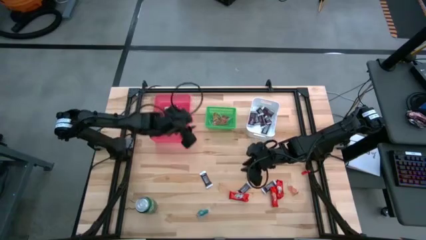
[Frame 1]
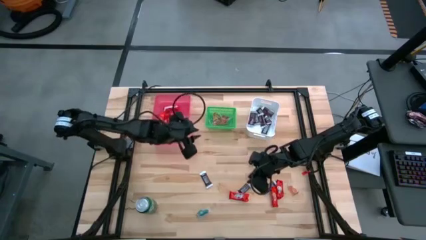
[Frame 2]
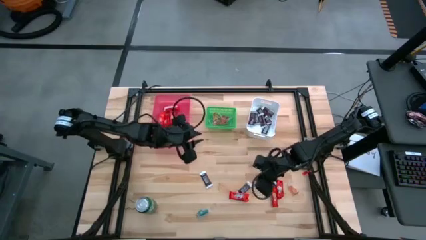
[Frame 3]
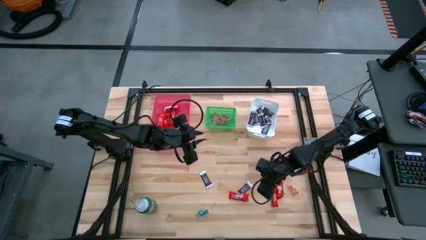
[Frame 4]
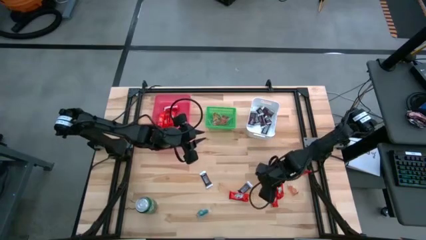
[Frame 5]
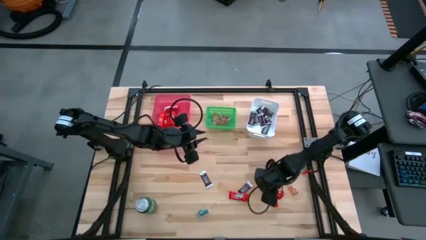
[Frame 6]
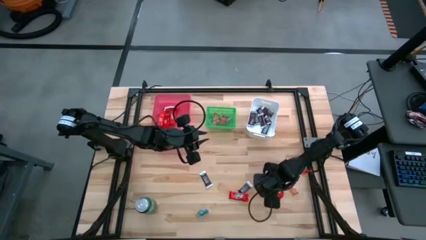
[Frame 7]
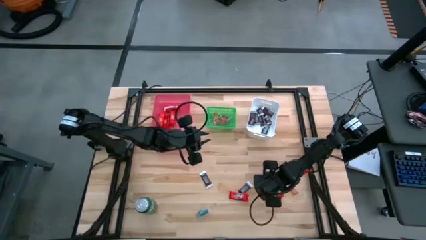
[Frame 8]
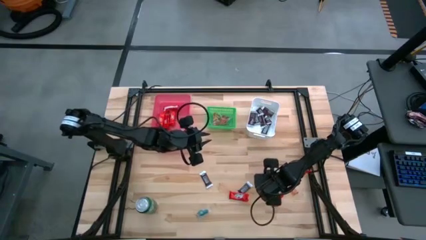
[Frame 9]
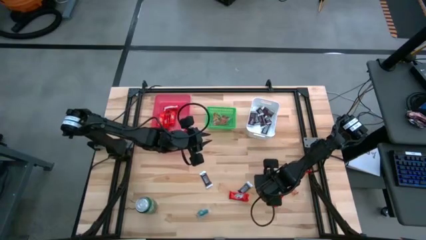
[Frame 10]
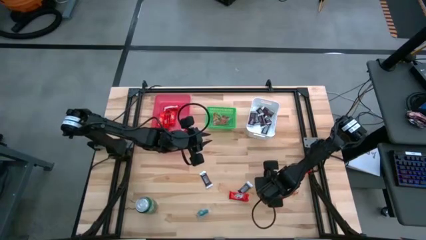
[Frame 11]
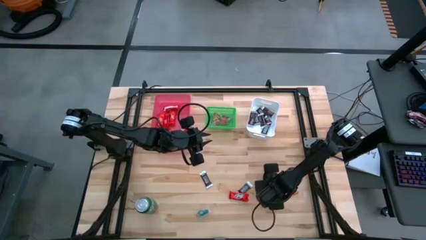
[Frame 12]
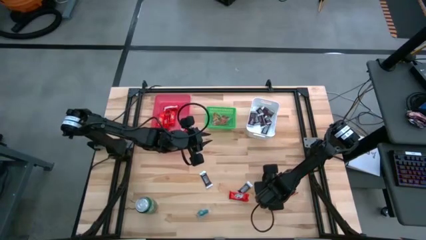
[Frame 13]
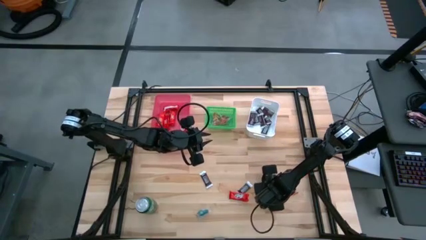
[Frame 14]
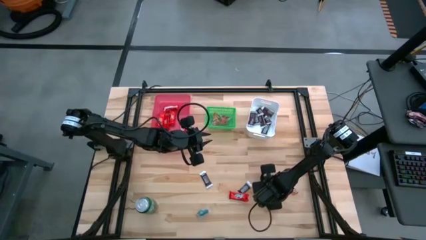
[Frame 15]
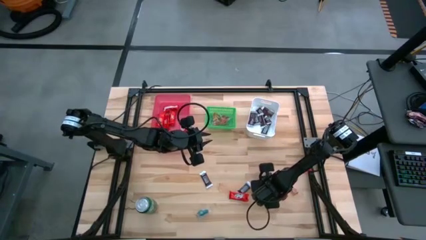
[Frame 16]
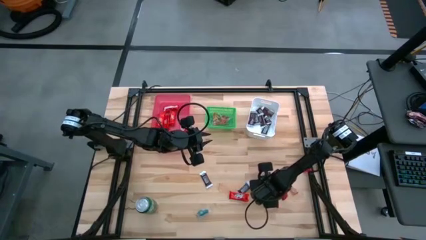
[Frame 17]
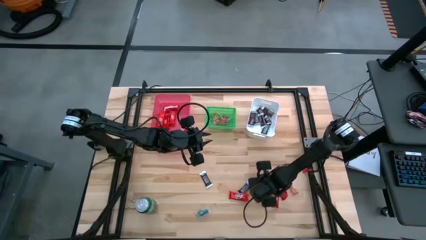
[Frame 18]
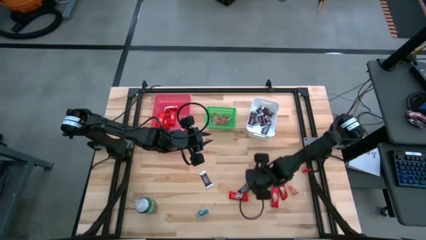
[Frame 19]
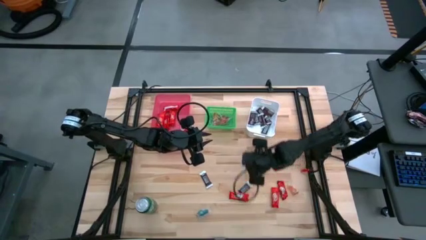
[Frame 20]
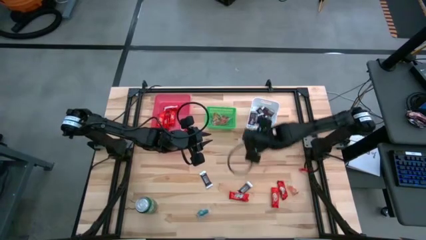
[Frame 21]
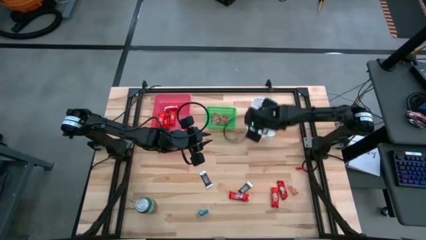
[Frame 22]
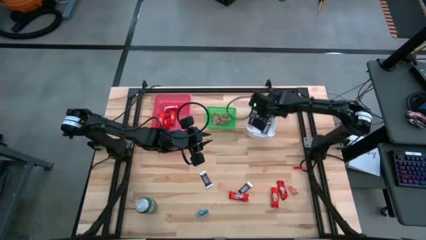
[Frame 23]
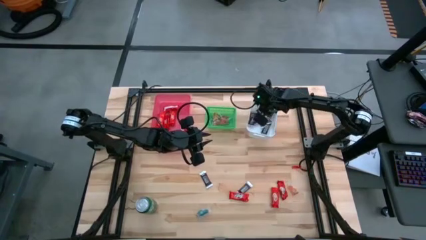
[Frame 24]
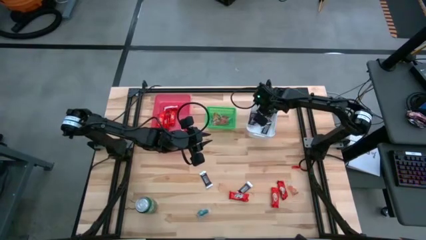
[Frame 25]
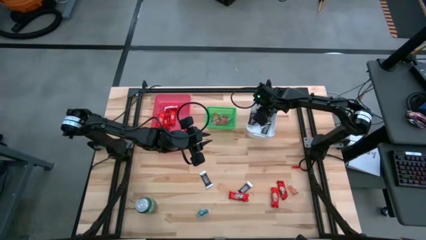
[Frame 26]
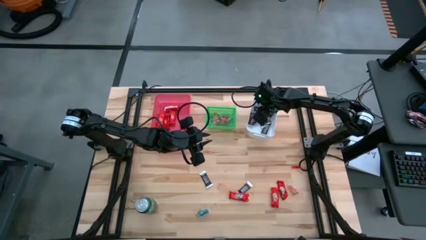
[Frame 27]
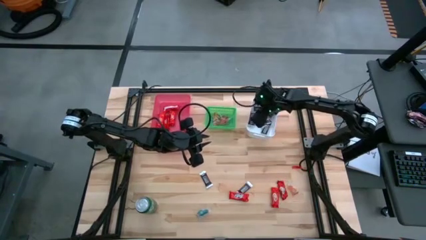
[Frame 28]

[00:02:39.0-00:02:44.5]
Task: Sort candy
Put the brown chocolate bar into the white bin

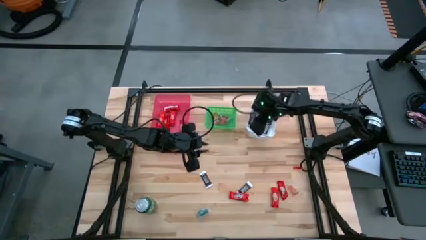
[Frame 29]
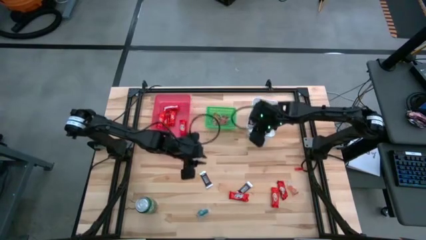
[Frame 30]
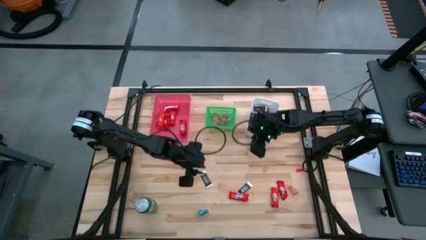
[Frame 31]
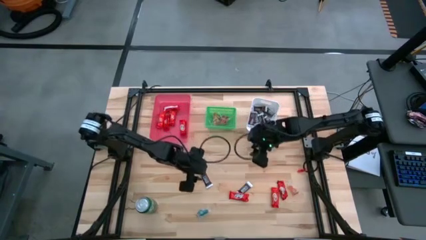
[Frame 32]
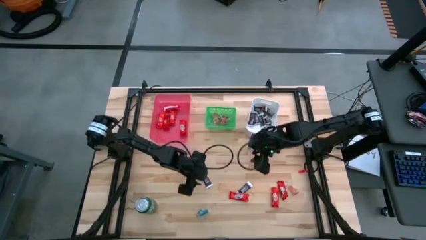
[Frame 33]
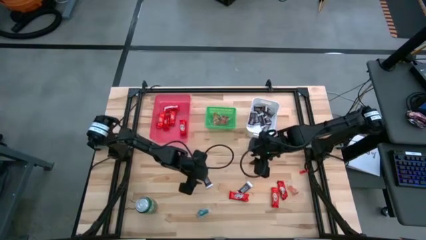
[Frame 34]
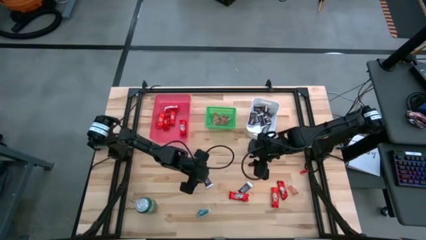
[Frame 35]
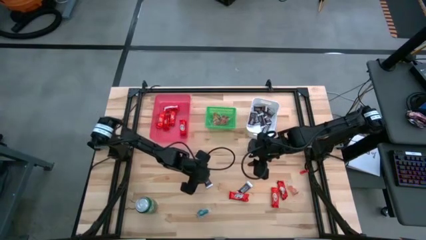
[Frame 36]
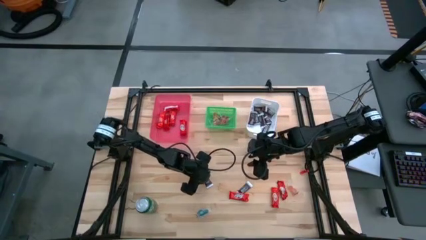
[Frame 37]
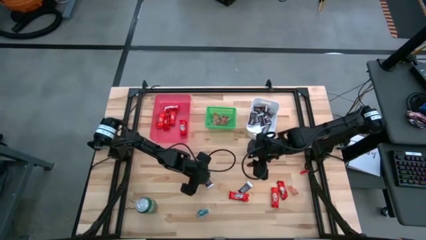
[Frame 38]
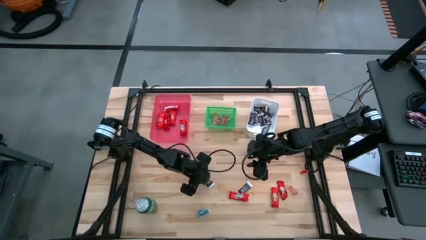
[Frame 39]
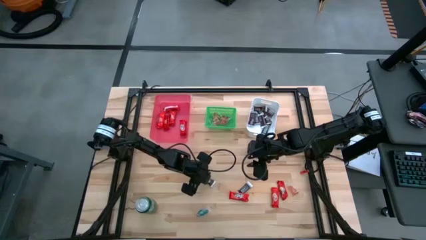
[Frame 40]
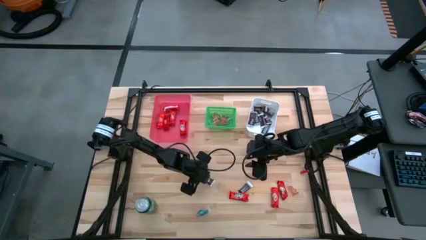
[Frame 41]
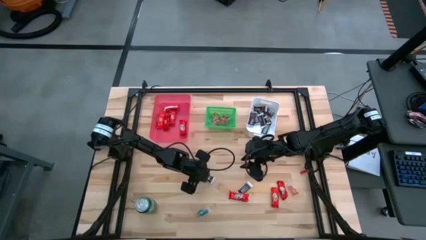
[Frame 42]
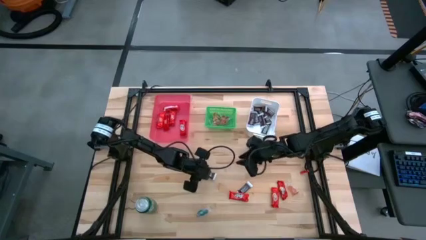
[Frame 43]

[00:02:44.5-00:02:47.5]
Put the brown chocolate bar into the white bin

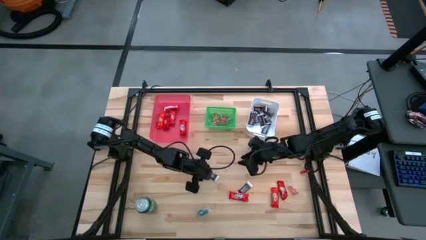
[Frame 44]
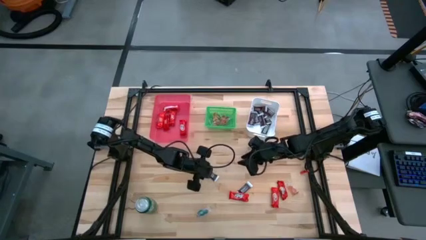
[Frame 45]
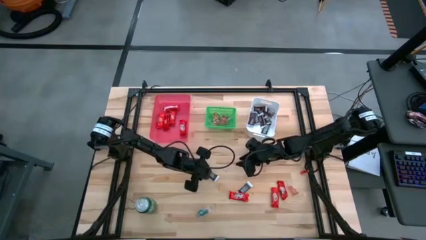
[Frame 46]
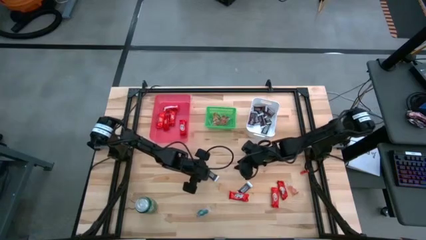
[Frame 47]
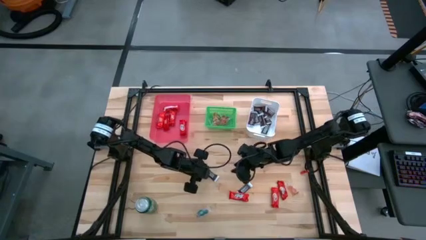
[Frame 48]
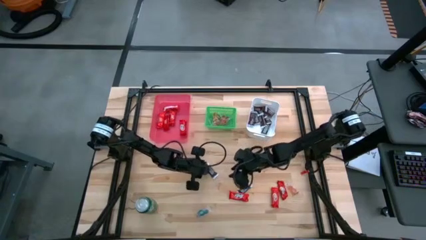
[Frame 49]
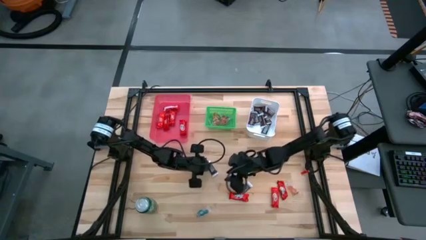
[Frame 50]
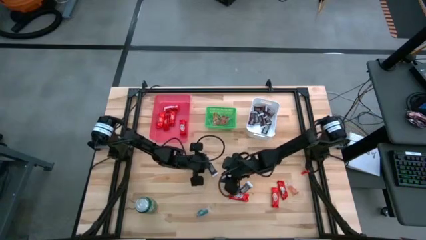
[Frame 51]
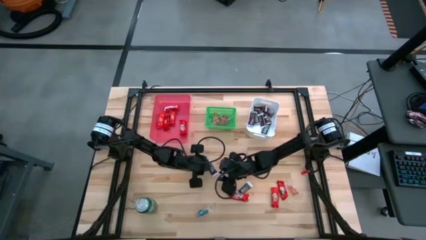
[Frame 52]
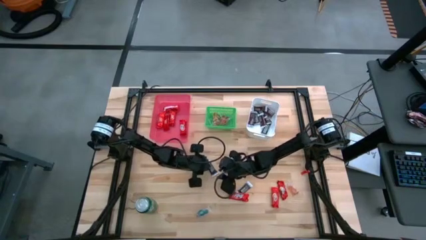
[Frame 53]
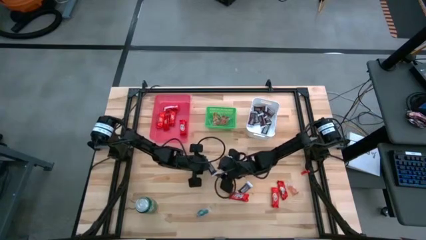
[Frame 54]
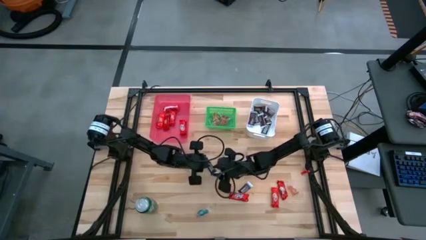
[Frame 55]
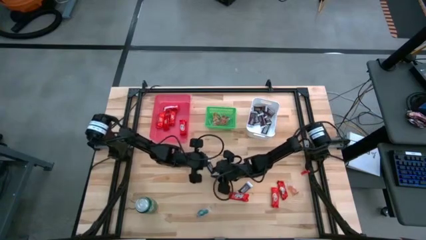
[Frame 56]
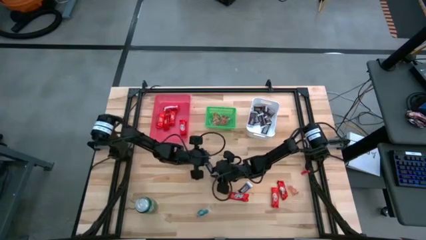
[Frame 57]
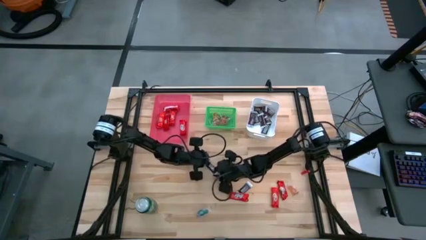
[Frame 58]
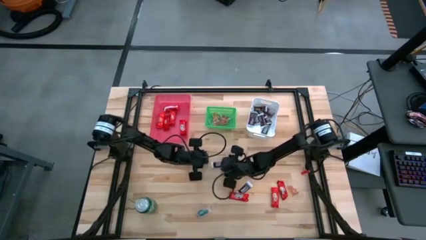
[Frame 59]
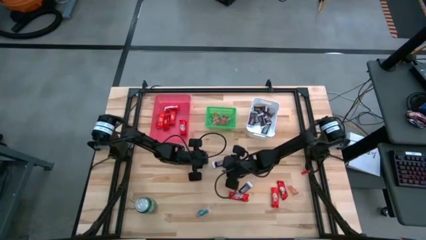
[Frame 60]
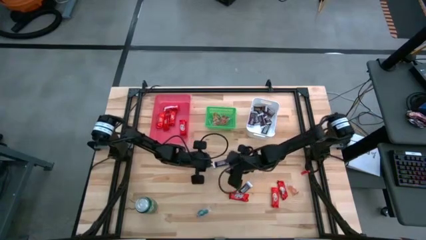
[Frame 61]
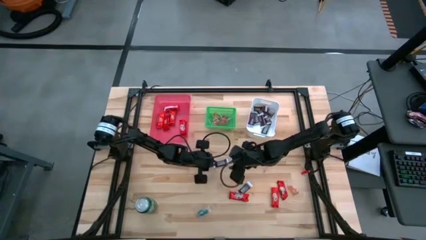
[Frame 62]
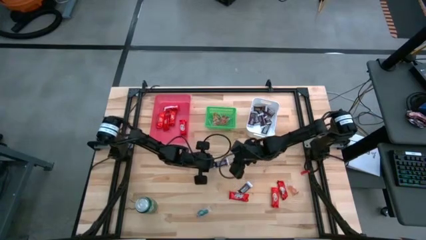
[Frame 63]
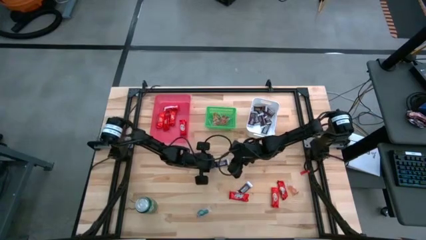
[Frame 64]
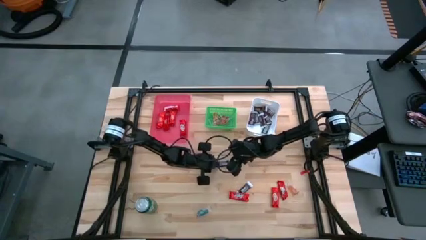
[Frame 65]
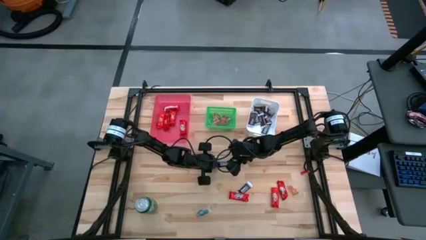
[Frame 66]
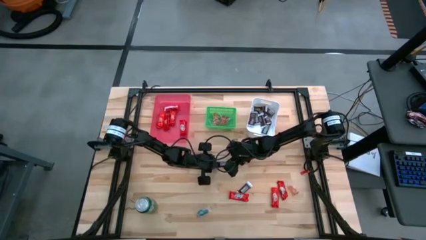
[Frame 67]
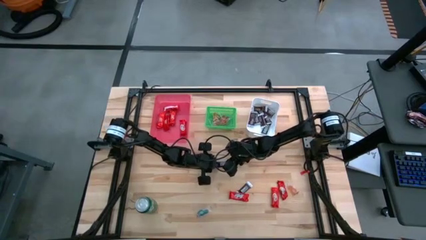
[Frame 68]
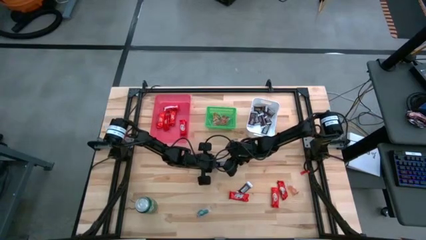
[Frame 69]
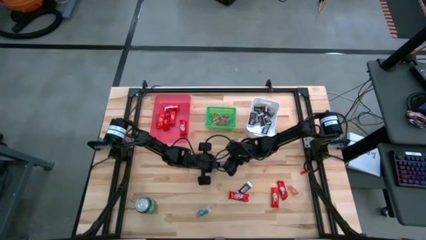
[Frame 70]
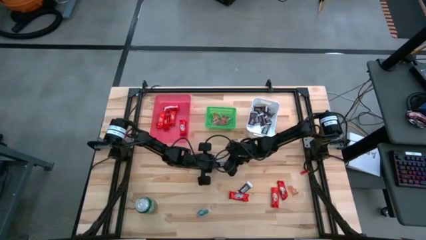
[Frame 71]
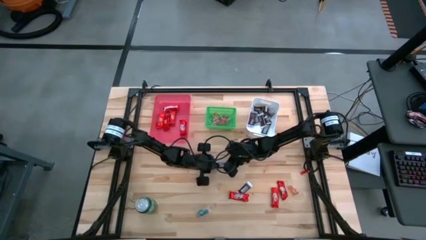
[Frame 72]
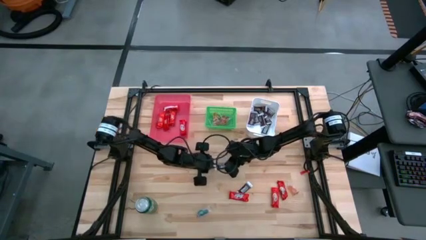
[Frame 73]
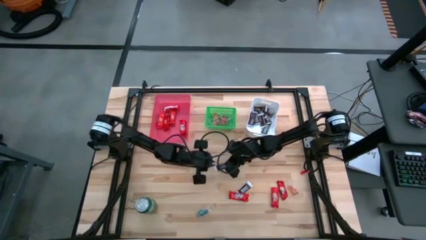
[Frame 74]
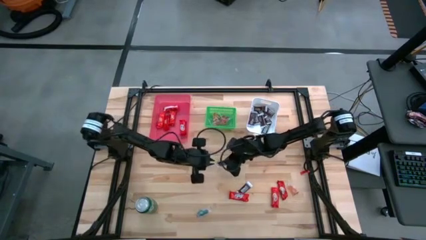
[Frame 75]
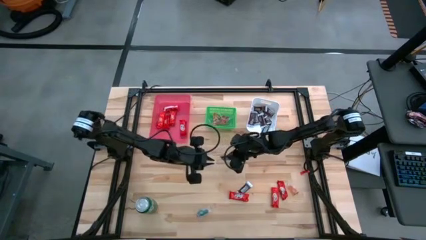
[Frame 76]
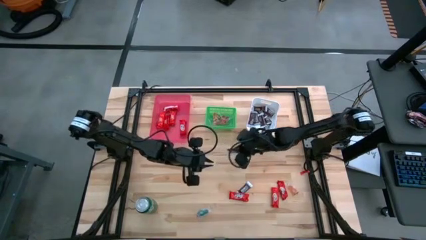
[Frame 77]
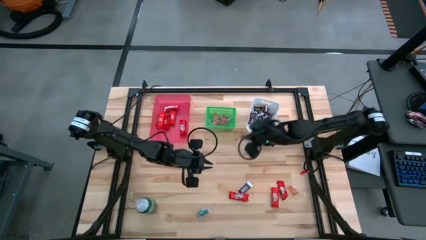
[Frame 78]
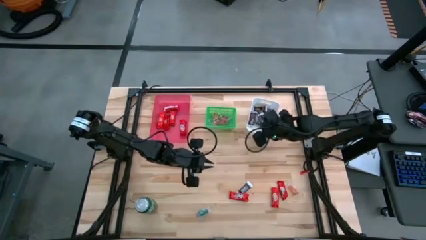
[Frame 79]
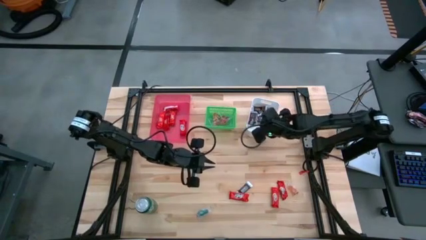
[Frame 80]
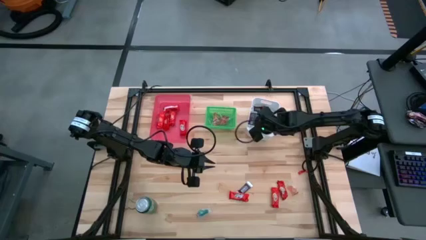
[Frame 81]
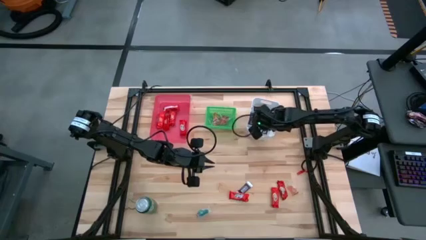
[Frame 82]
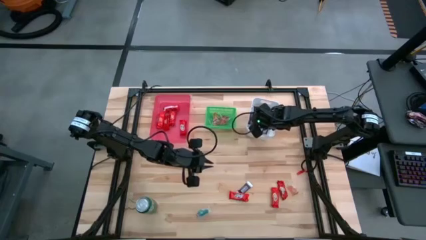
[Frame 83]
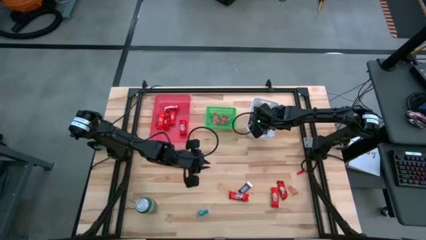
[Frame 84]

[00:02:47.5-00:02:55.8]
Put the brown chocolate bar into the white bin

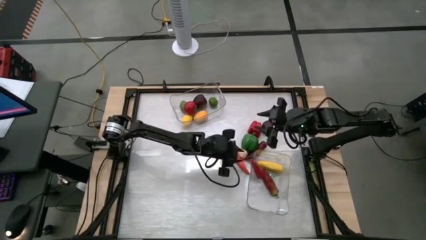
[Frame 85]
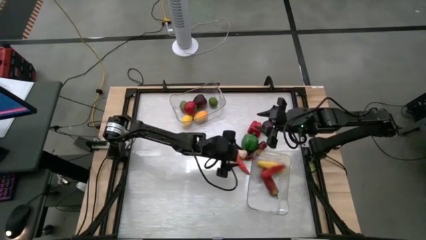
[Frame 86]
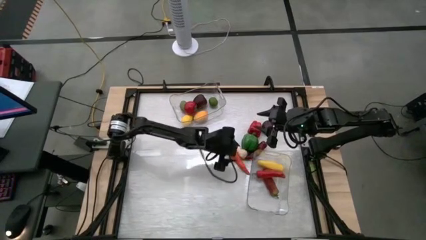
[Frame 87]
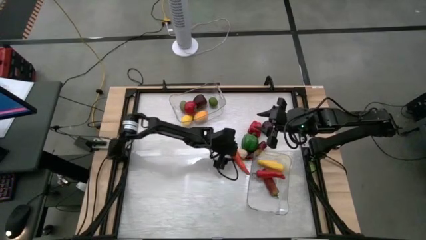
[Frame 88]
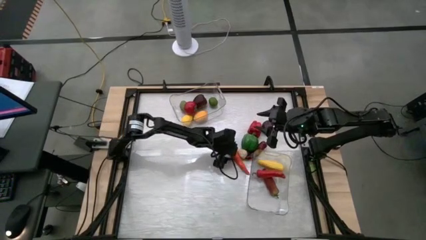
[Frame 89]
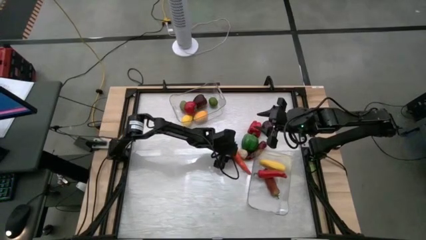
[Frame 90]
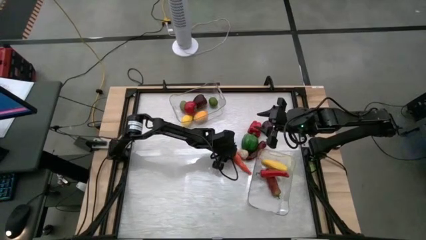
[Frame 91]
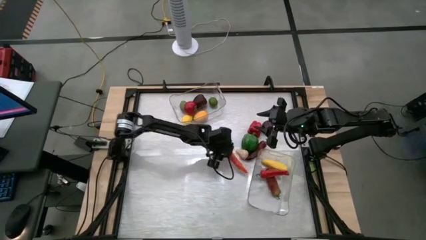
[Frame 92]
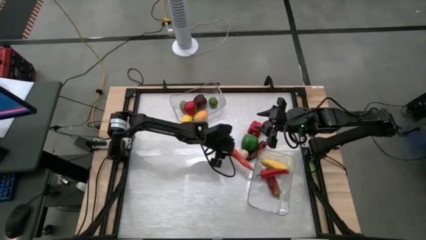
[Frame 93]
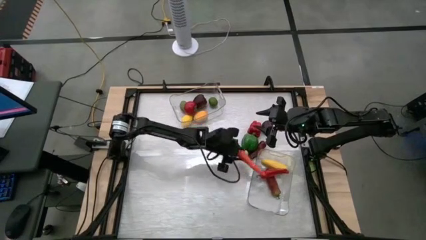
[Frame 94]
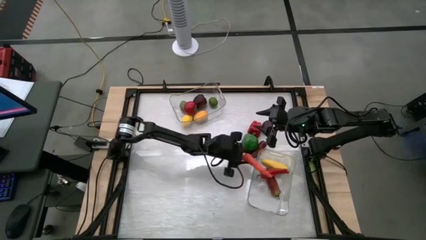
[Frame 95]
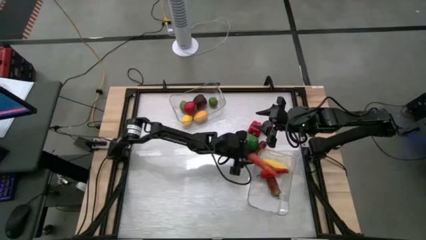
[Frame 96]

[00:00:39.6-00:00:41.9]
Task: Sort produce into baskets
Put the carrot into the bottom transparent bin
